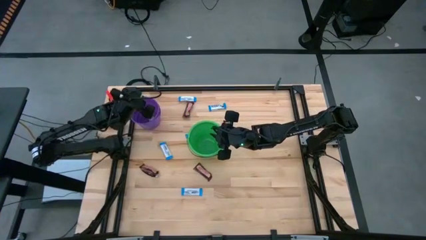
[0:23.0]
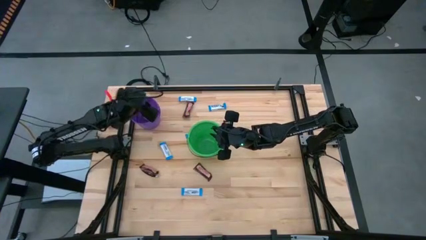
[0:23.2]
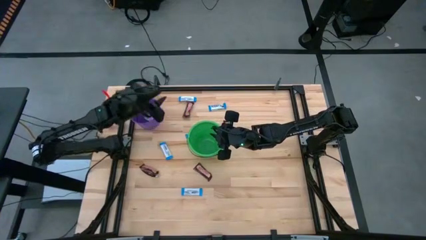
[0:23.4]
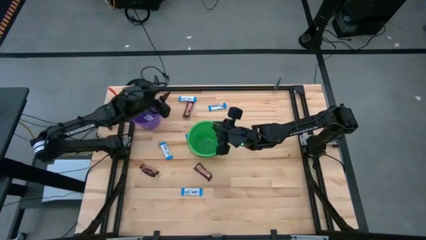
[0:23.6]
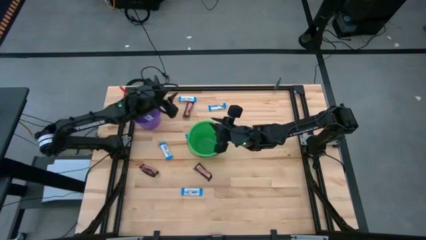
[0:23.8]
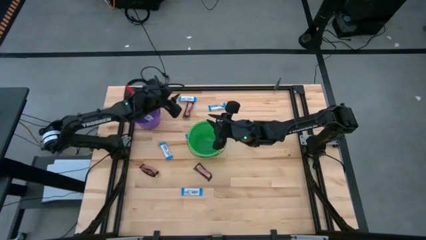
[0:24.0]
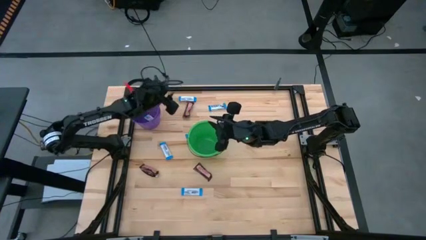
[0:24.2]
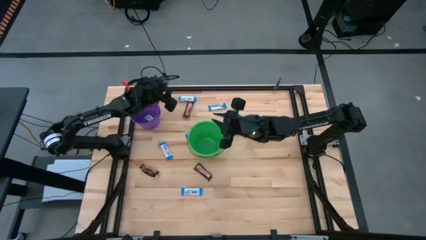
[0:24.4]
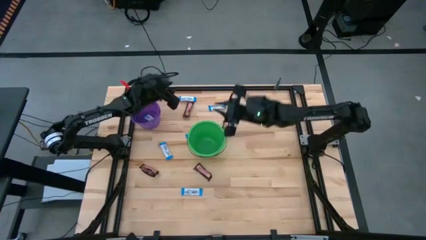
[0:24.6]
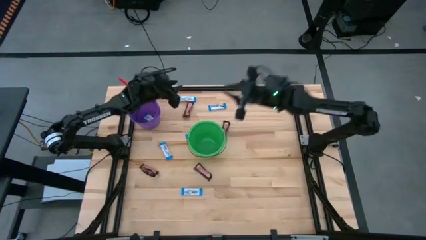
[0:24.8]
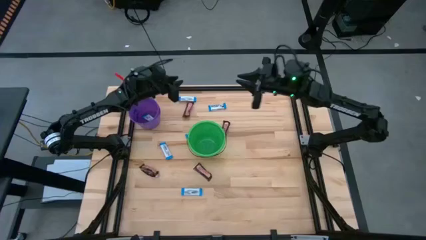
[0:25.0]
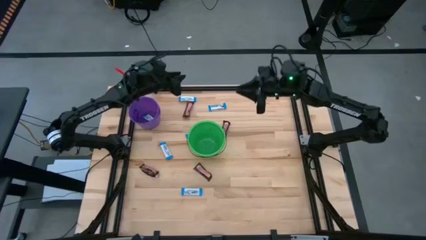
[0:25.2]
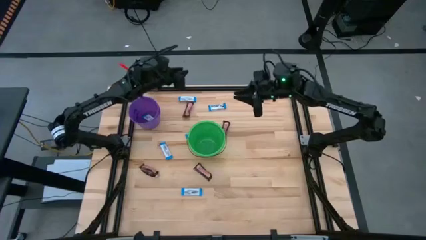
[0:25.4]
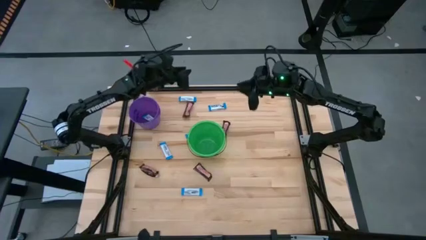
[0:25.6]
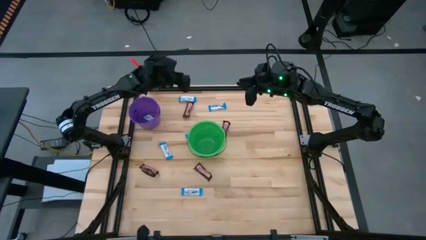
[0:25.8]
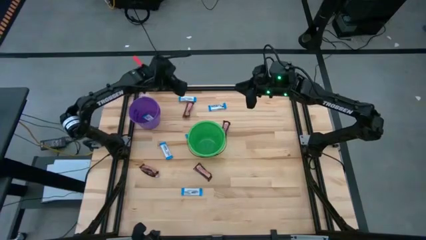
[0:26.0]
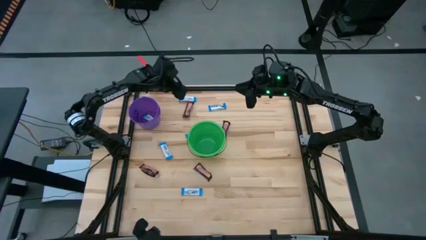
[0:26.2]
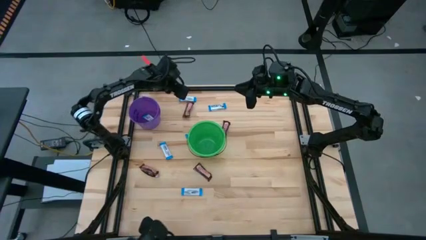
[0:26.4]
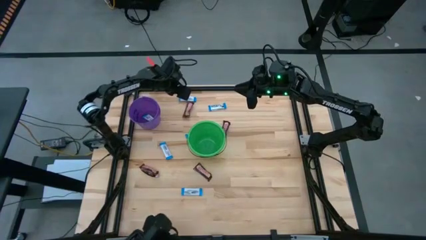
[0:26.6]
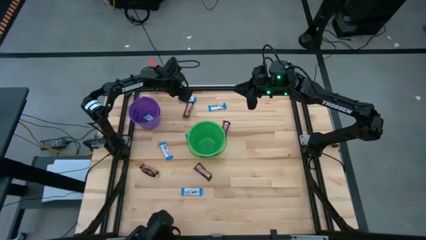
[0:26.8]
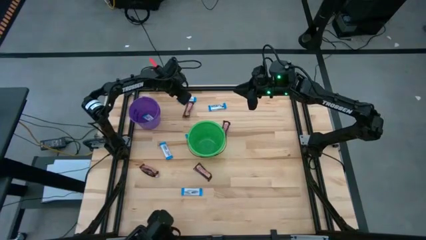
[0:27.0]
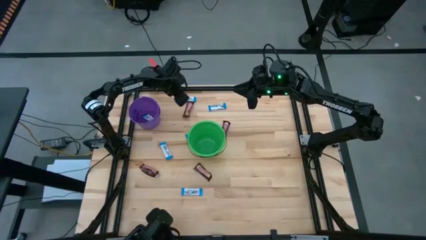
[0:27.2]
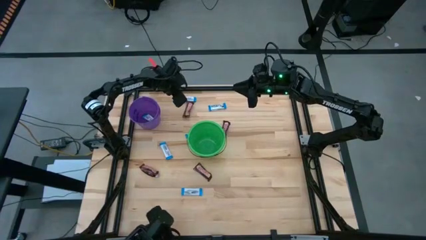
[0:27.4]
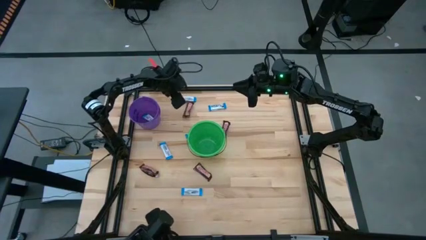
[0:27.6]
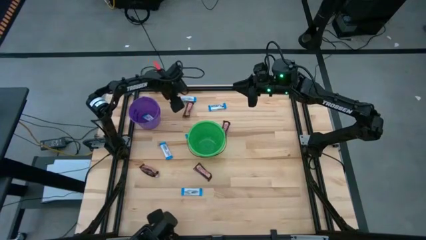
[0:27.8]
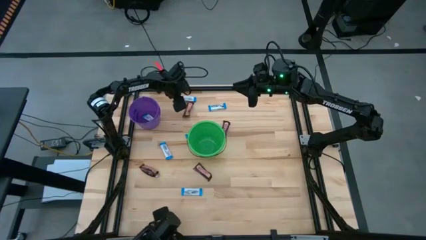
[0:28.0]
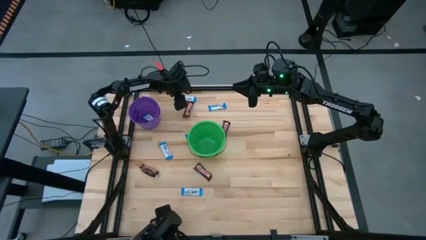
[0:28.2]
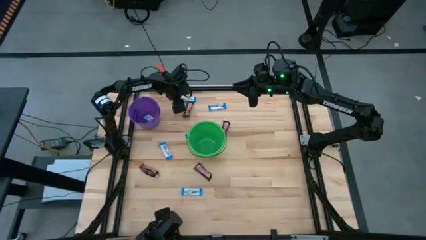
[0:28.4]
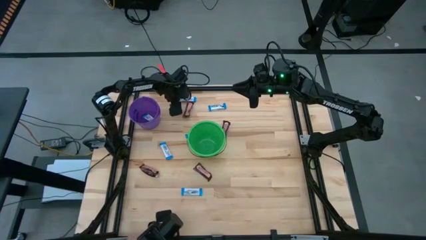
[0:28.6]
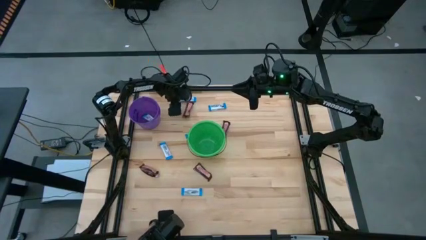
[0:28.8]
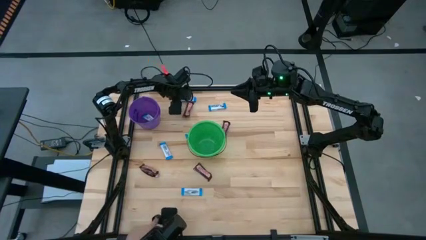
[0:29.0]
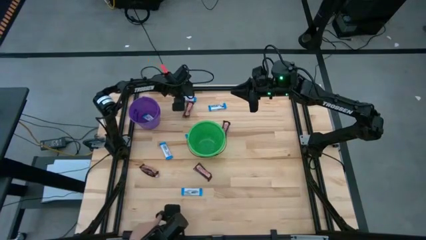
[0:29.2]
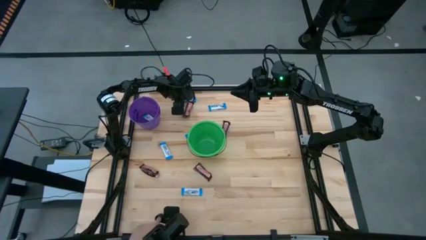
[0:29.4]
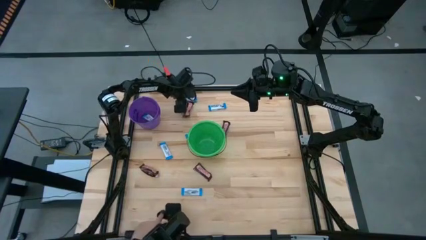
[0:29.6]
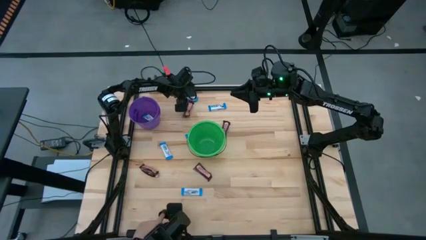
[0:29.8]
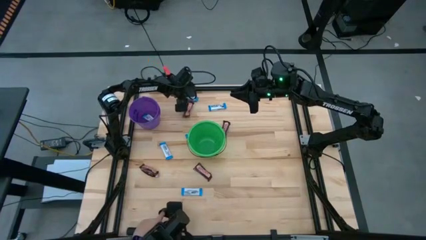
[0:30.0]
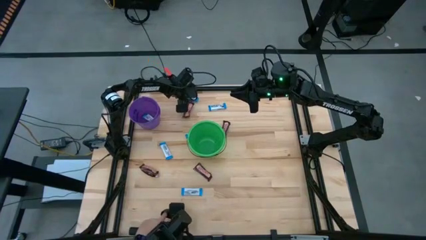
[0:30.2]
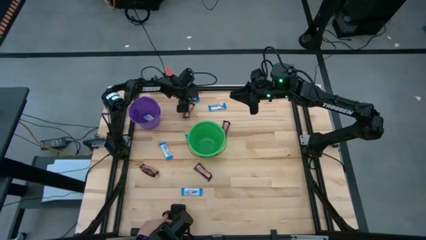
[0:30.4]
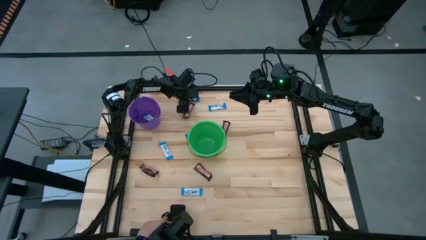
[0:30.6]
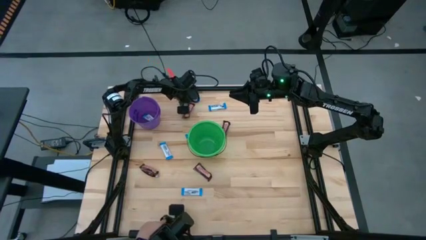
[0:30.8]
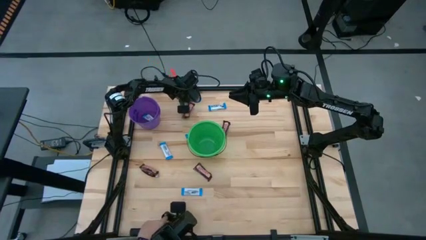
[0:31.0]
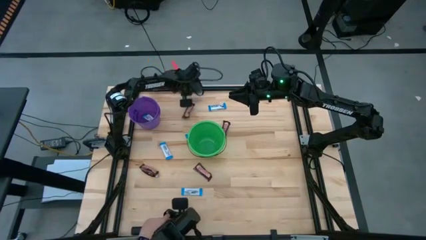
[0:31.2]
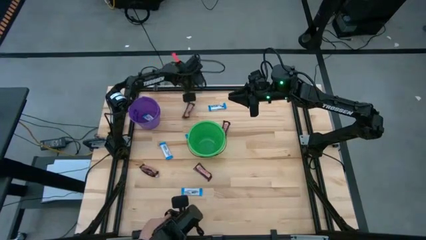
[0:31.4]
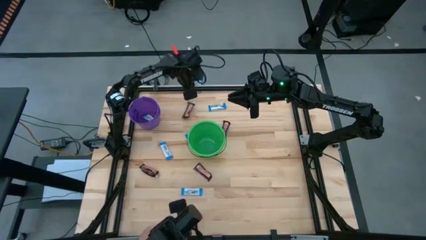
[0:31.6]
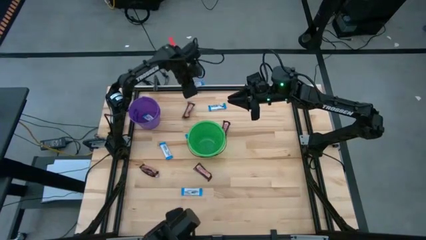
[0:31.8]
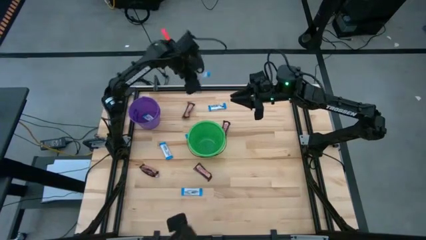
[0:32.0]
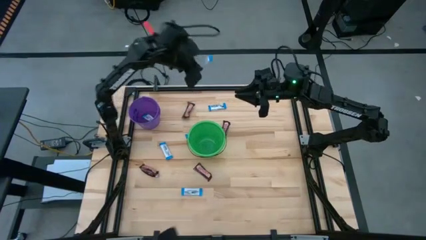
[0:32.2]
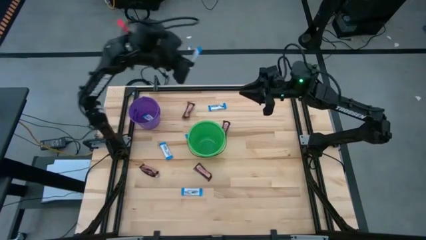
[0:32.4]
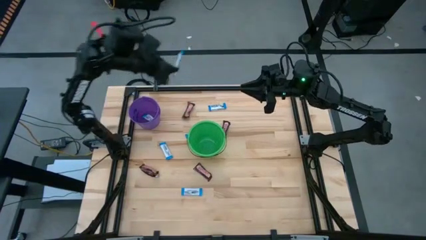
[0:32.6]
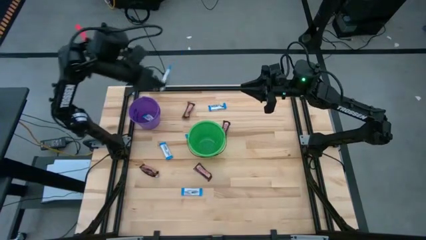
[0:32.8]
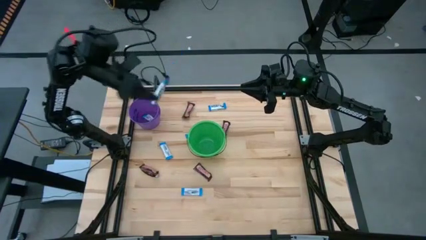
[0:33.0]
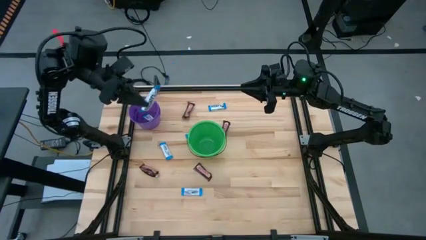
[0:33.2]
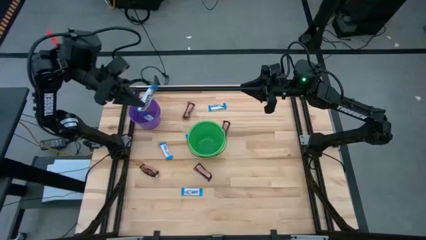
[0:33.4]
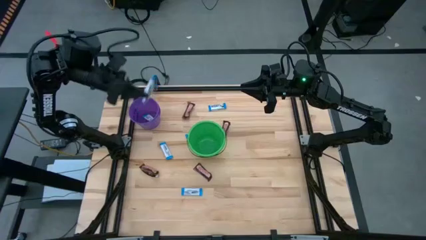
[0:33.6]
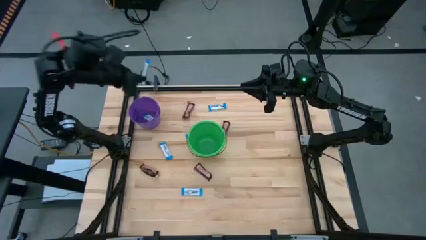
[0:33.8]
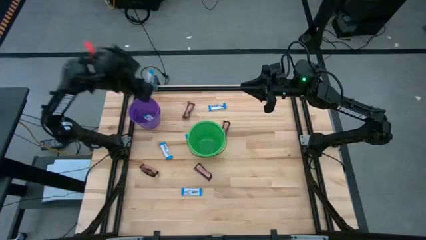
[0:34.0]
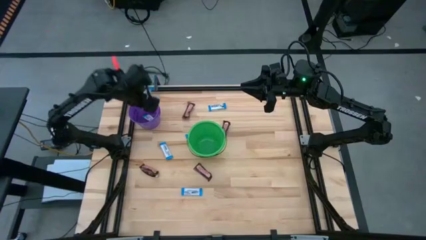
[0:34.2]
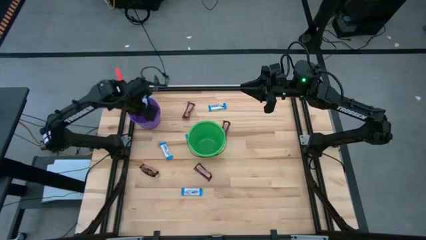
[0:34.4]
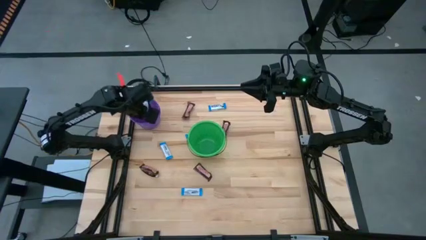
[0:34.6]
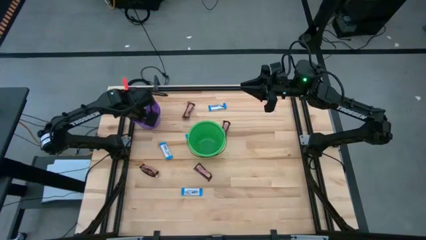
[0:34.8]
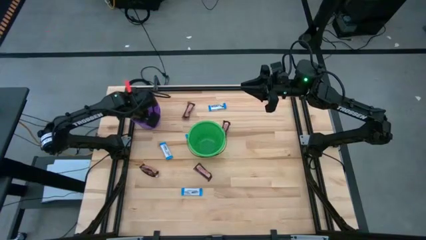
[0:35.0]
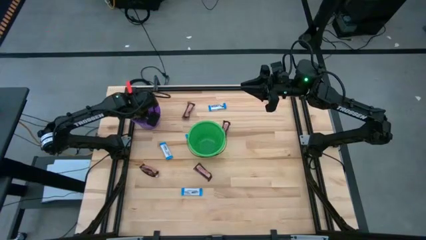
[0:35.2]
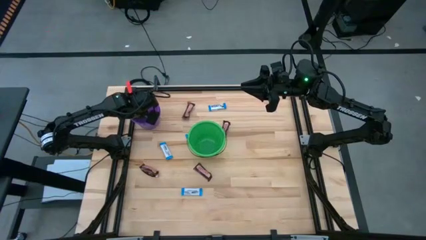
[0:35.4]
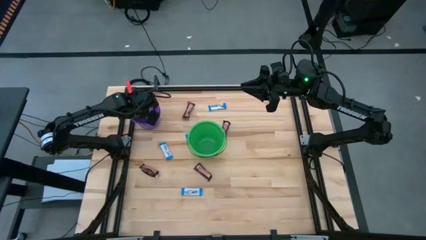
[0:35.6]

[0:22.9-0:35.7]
Task: Sort candy by brand, put in halloween buckets
Put the white chocolate bar into the violet bucket
